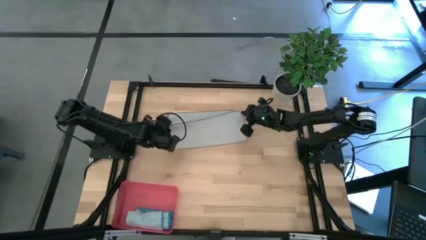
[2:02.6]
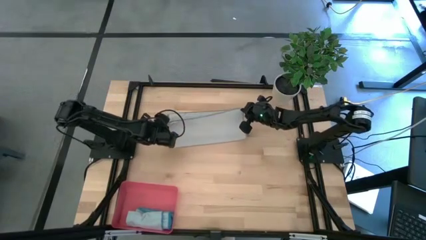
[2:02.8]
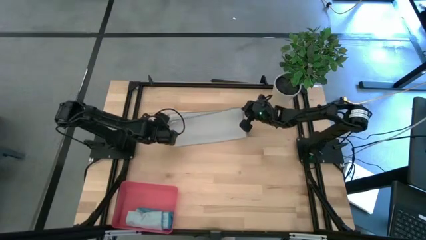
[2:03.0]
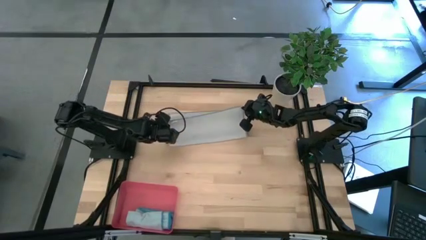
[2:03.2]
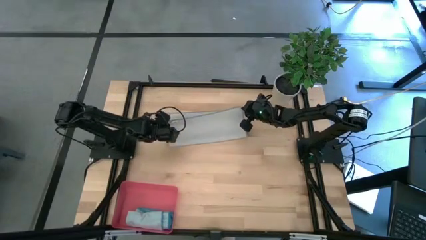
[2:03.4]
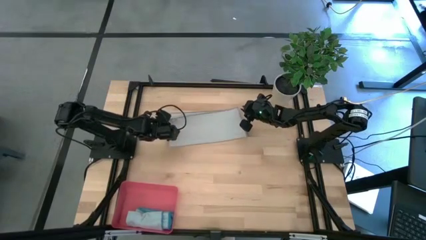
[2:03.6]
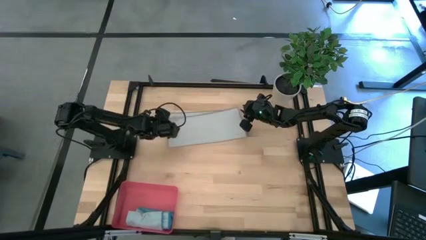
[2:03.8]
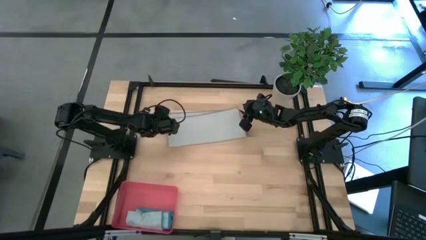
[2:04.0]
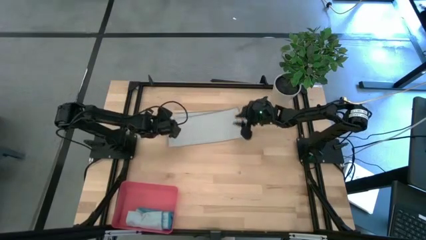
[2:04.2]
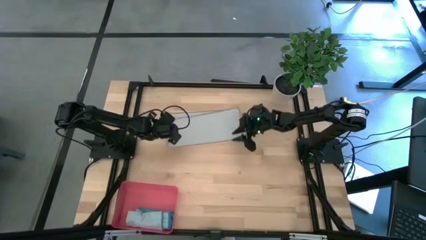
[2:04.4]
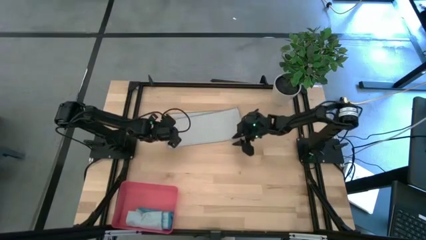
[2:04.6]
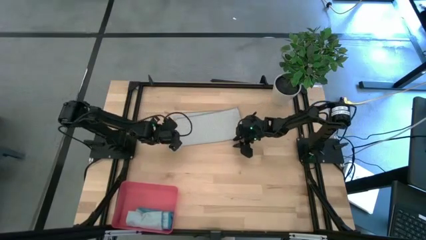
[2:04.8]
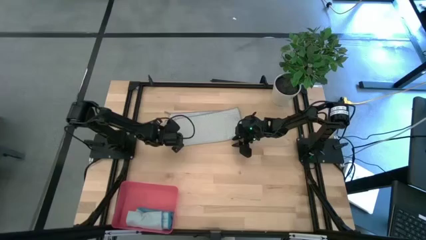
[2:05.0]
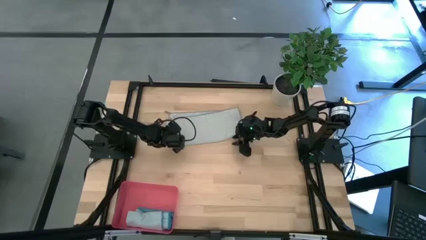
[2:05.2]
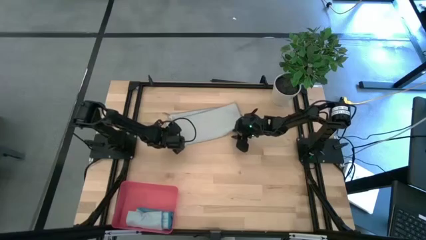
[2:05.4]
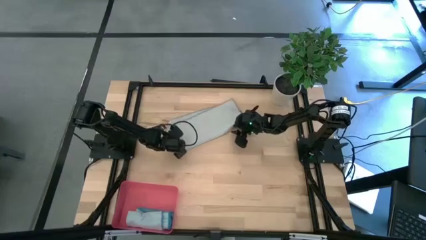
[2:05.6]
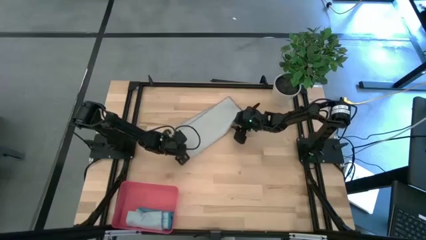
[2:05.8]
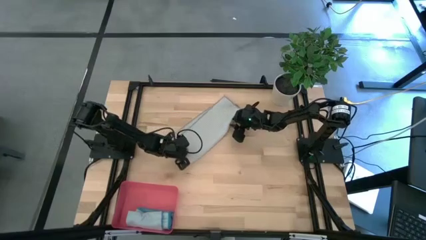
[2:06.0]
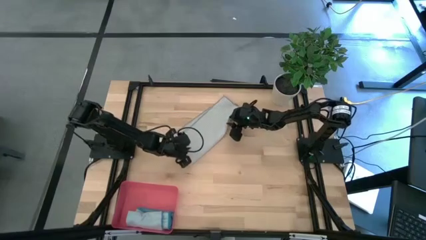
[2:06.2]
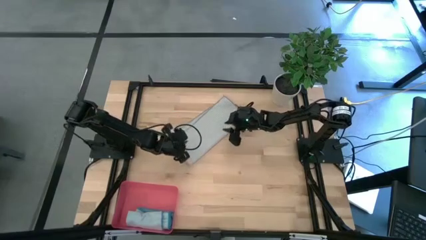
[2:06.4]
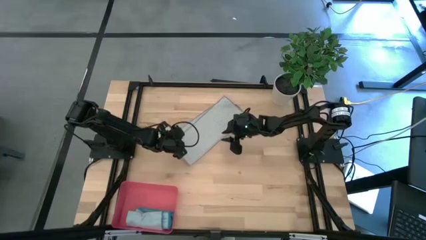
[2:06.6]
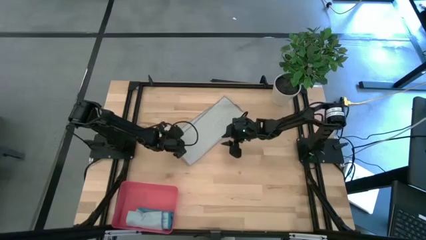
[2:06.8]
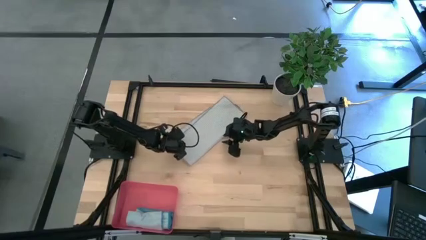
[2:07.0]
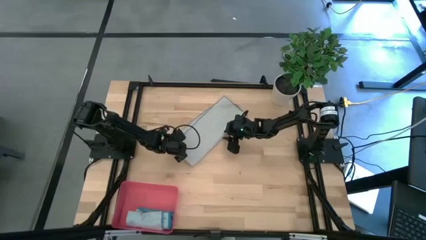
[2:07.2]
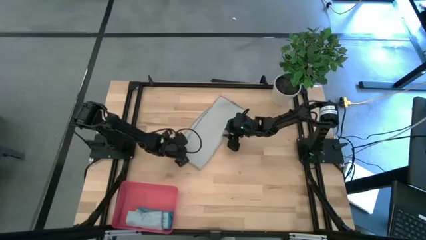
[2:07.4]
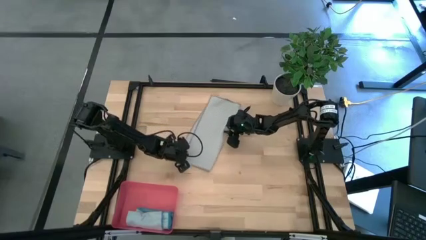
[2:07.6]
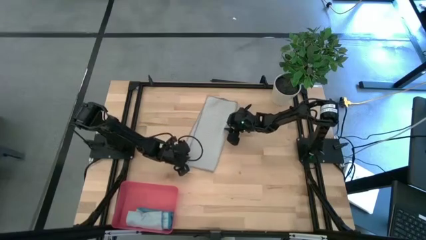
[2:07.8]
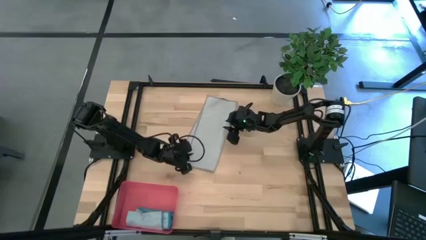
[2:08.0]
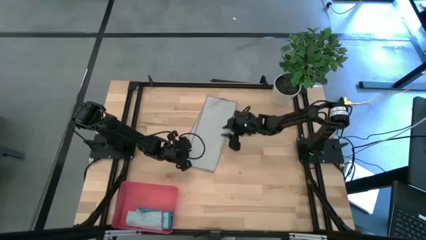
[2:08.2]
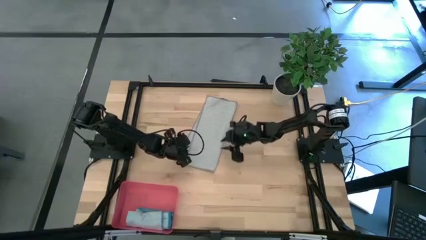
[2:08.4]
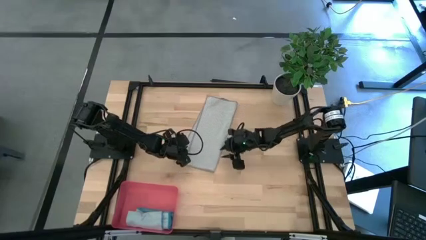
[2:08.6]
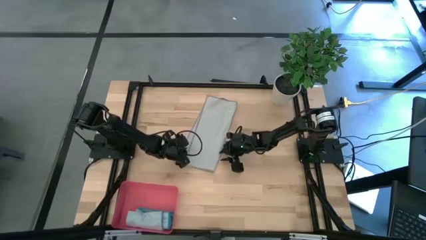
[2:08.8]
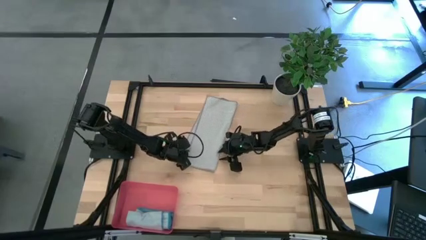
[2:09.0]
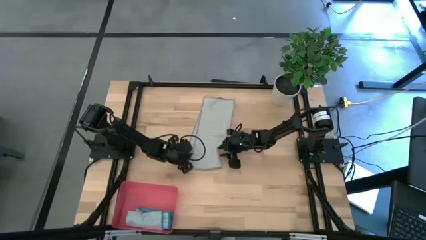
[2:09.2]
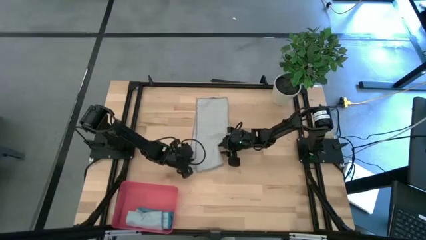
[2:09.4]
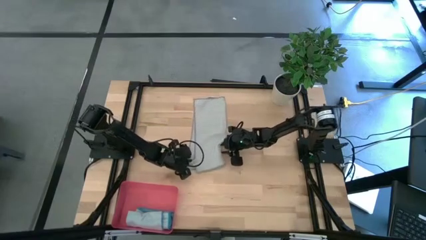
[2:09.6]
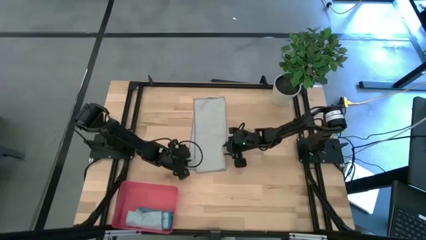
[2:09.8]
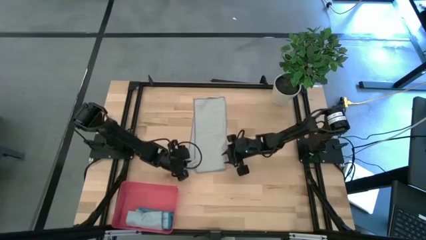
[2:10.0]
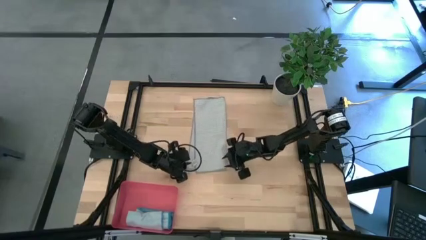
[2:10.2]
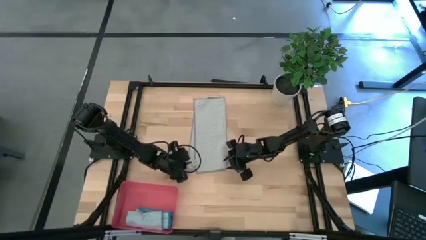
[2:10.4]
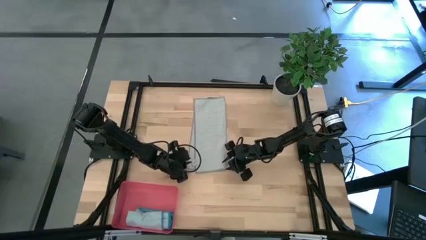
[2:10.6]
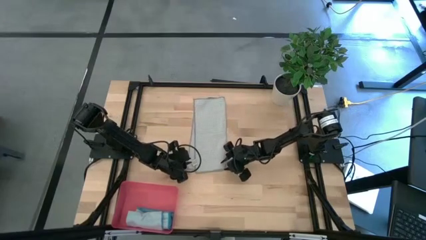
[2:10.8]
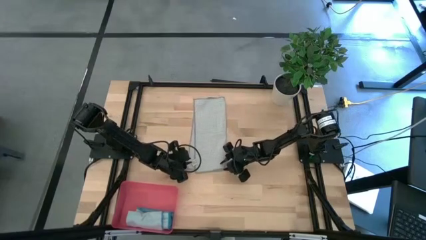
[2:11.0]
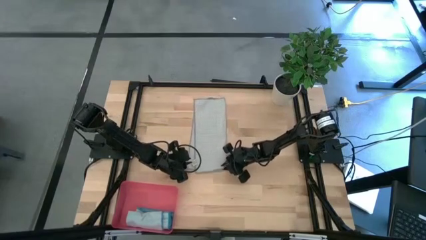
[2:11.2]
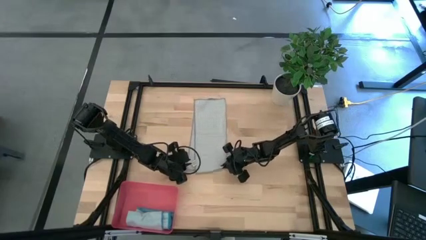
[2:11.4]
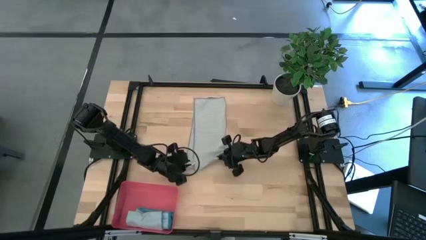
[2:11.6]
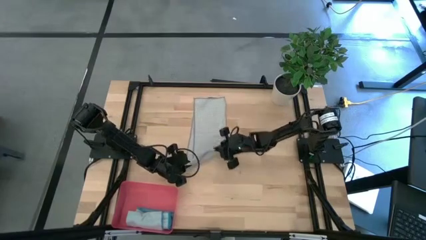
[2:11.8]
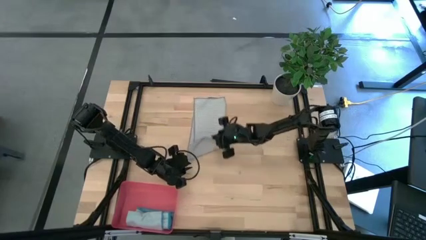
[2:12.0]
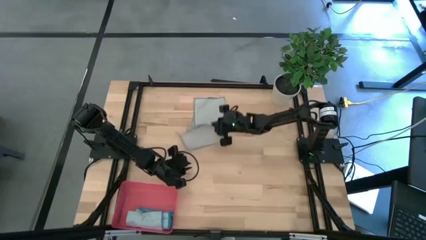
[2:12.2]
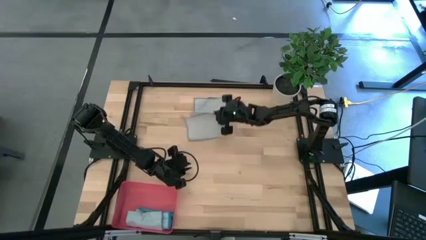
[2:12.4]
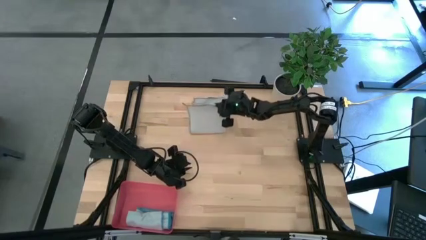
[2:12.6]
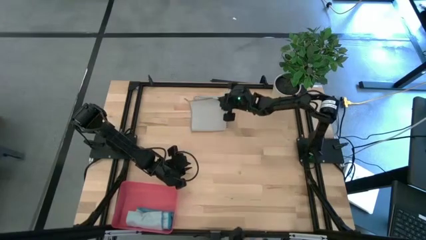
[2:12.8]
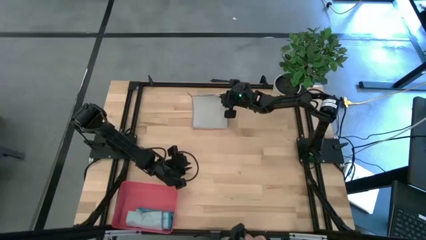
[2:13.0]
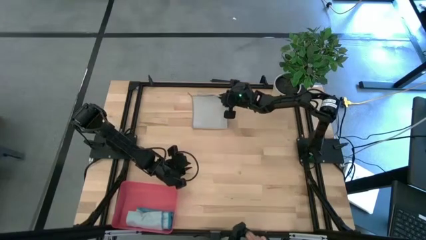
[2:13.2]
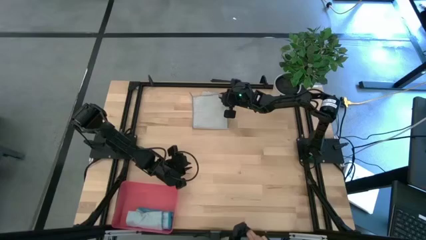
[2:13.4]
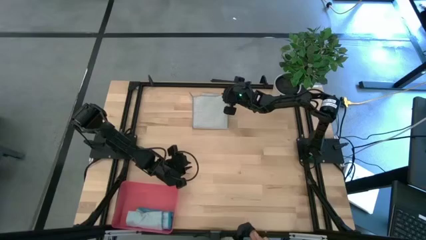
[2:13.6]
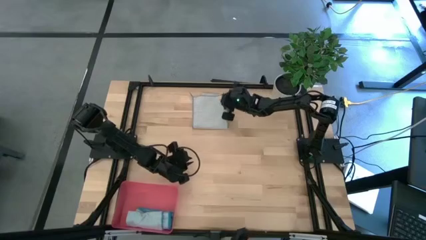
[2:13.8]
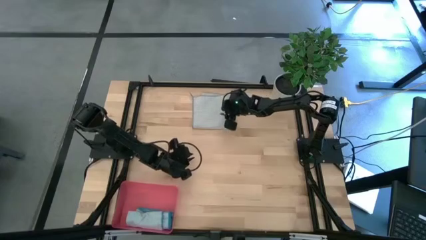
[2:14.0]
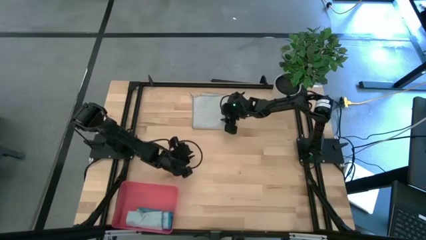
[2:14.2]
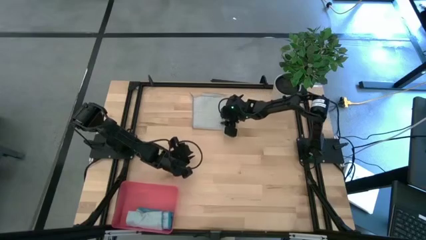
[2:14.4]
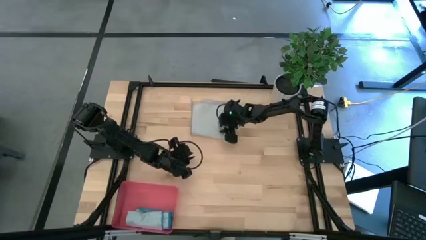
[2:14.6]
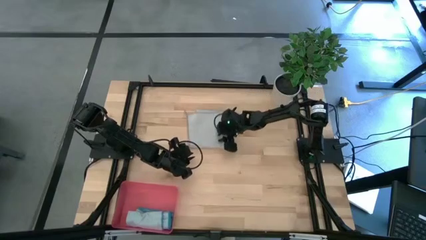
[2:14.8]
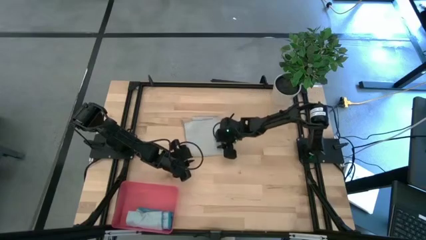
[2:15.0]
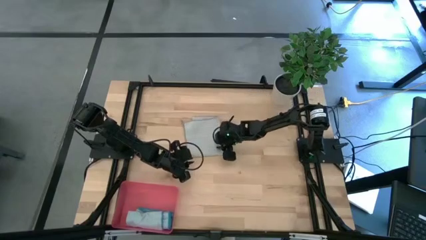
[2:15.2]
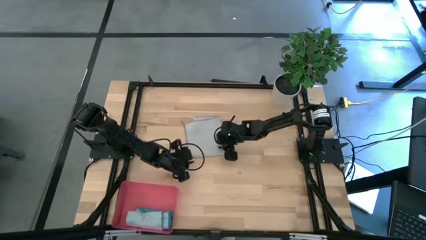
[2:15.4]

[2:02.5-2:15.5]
Task: Roll microfiber towels into tight, uniform cylinder then place into a basket
Fold the gray towel

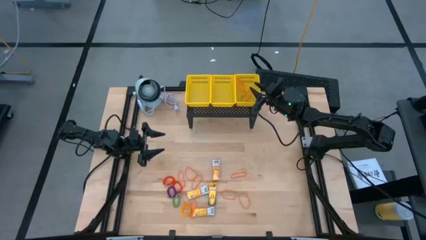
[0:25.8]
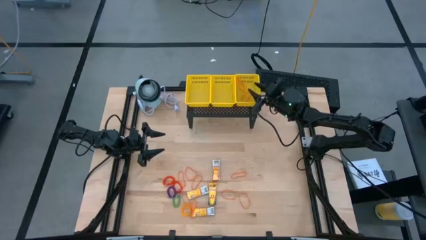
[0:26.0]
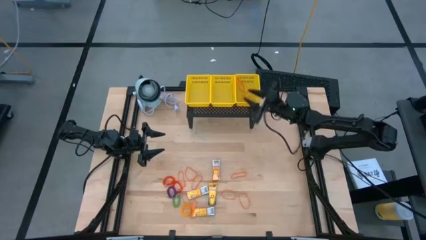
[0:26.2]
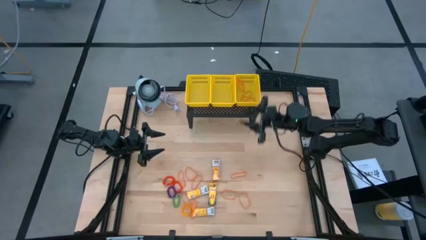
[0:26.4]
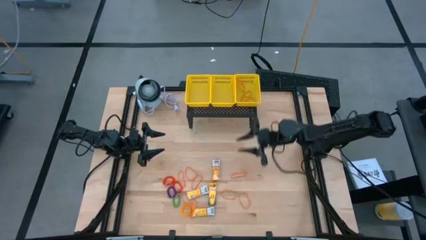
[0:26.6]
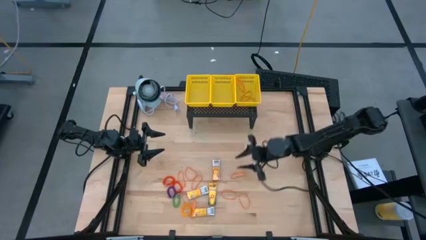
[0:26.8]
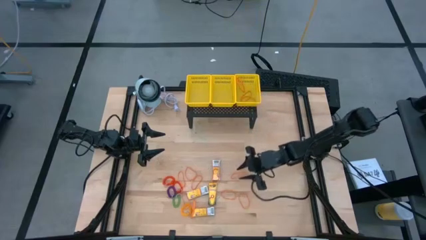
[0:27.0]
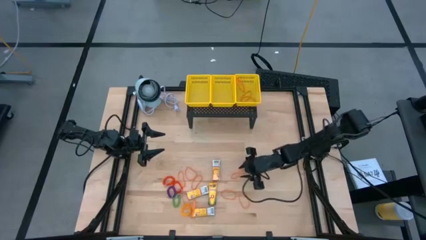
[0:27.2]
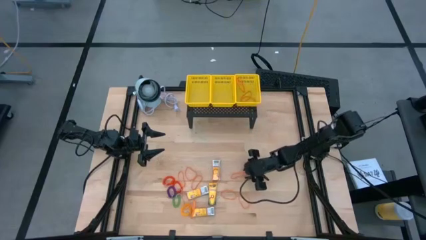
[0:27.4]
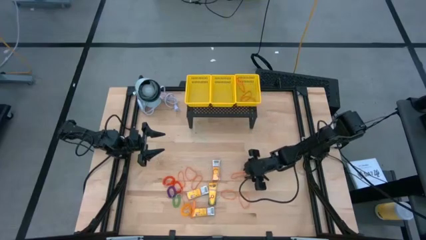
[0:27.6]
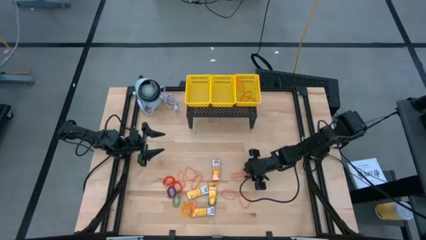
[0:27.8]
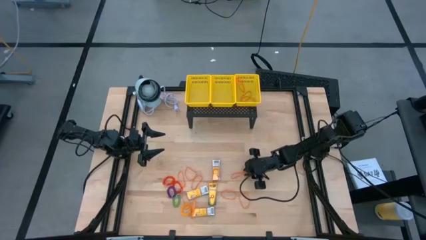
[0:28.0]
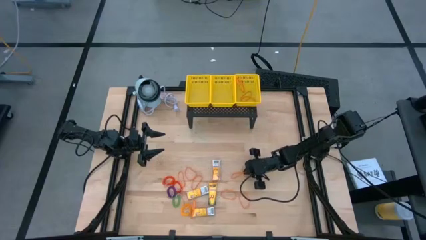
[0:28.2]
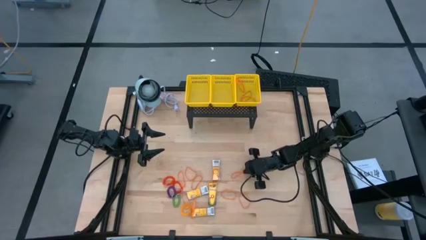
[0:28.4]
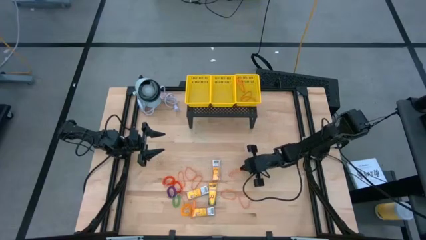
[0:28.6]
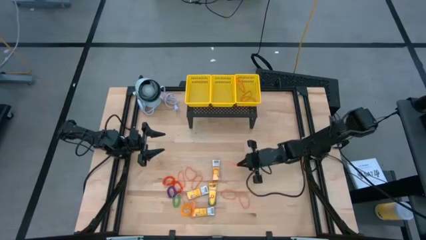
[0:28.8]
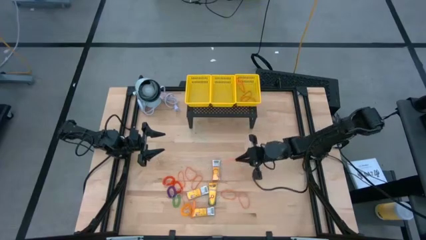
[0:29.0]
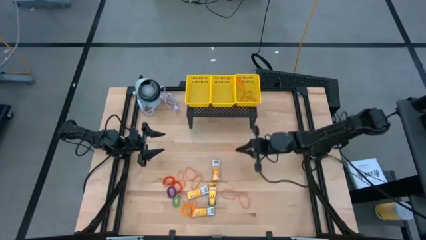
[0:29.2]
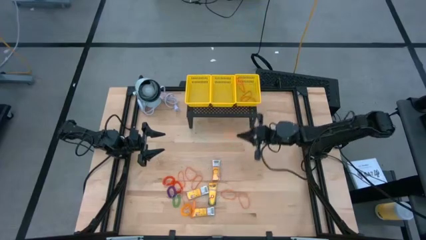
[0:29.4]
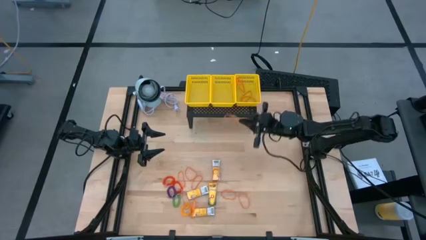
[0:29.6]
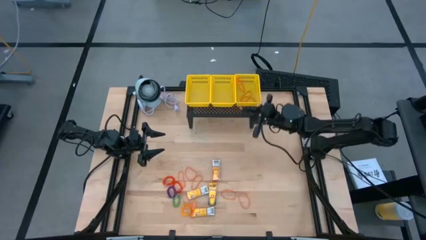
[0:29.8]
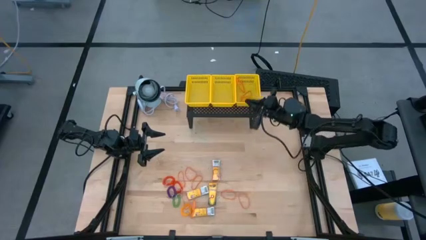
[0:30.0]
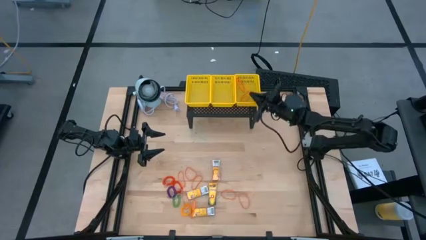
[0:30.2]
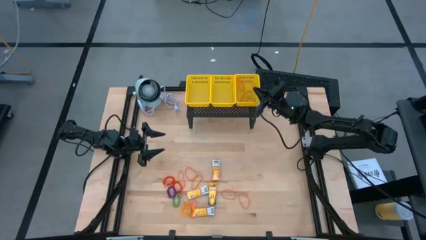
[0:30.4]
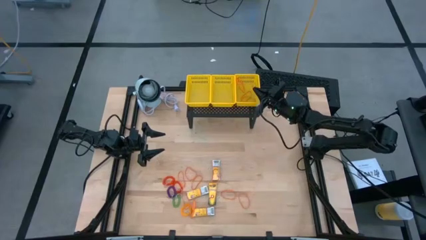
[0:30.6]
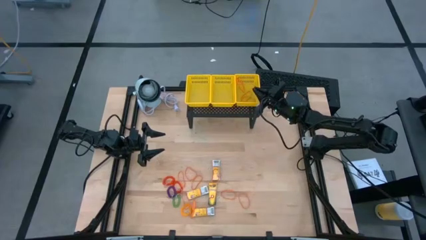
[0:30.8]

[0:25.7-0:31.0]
Task: Pick & Place Office Desk Supplies
Put the orange rubber band into the right yellow bin on the shelf
